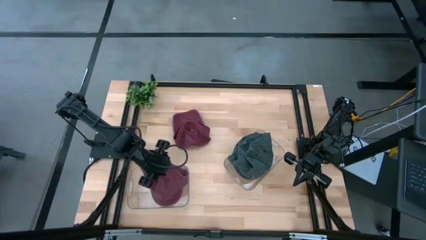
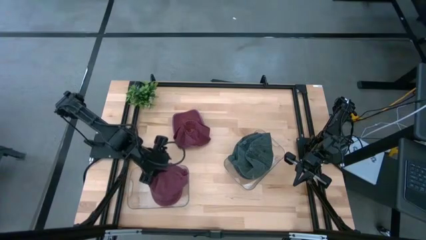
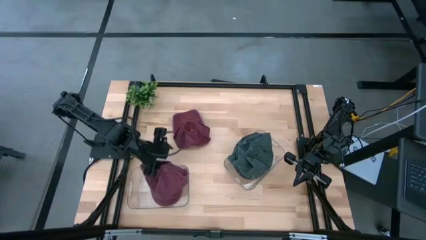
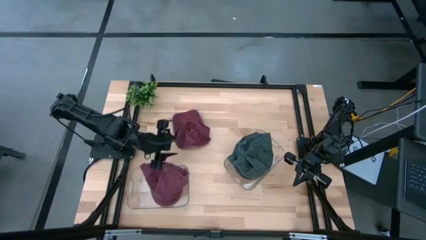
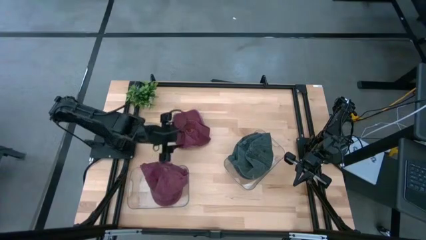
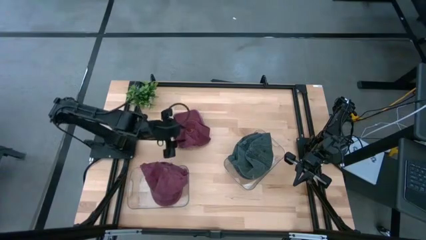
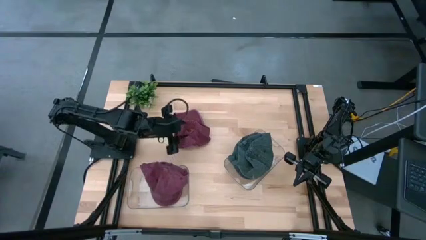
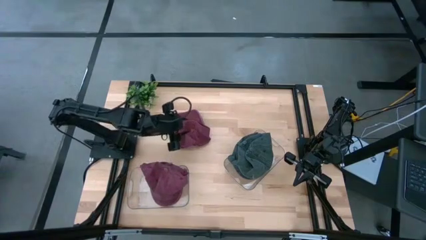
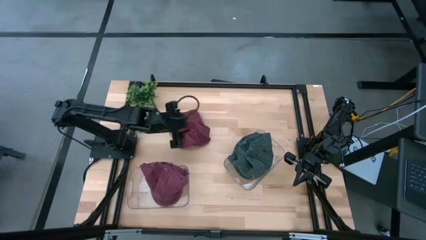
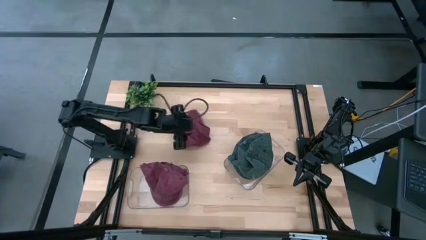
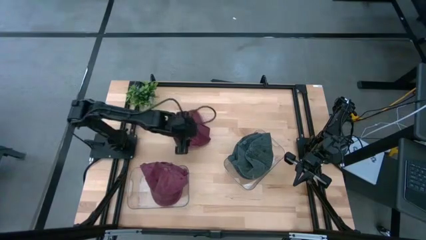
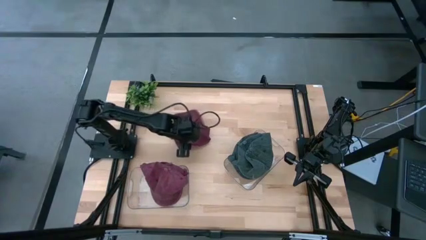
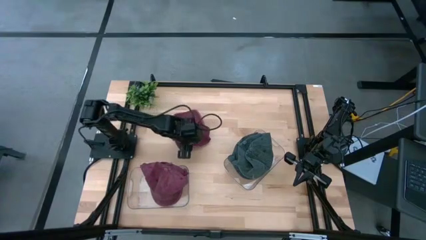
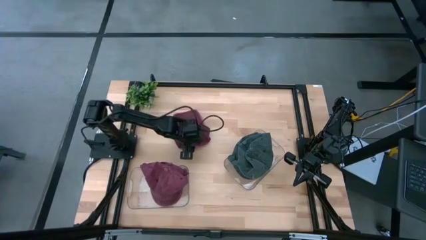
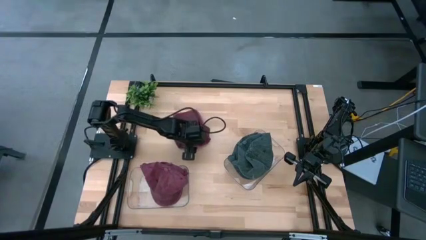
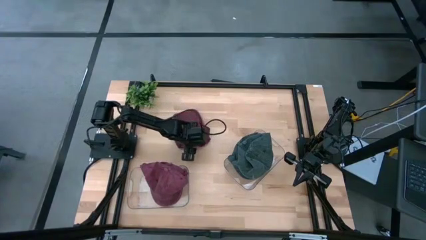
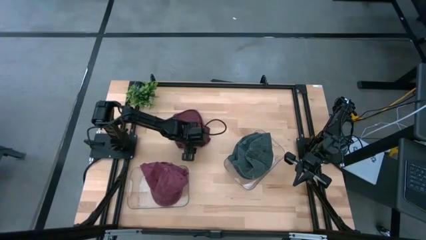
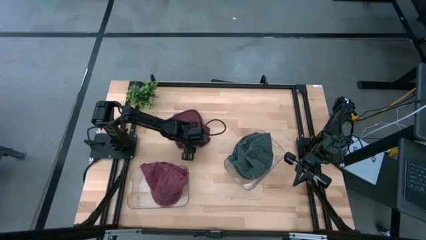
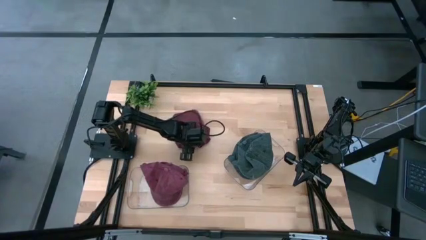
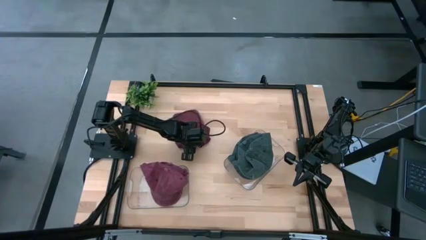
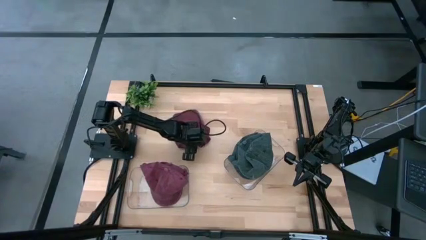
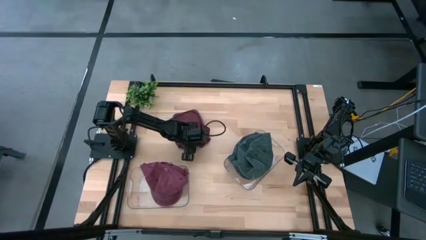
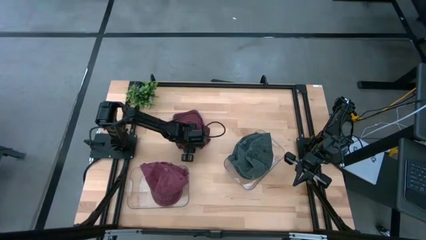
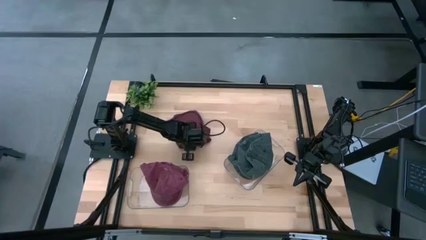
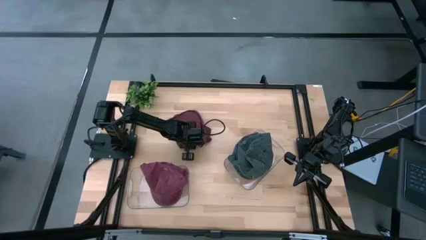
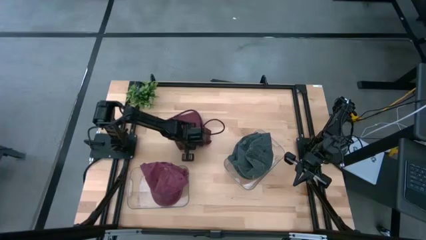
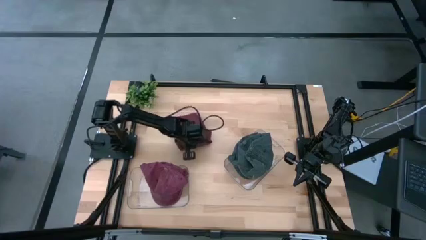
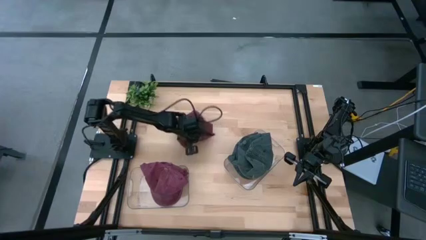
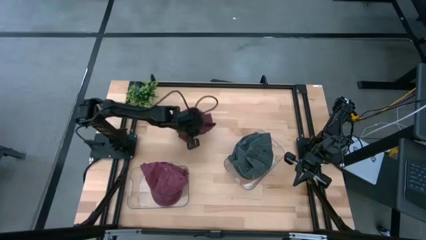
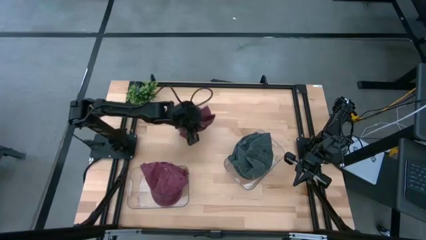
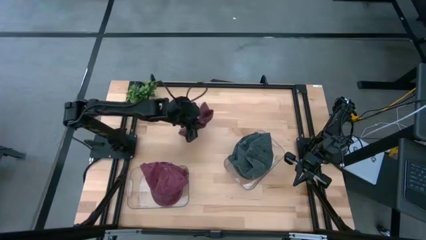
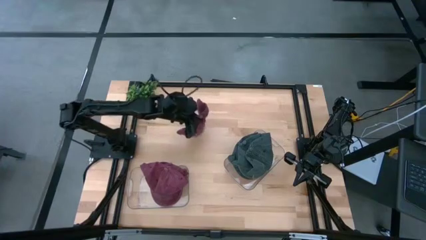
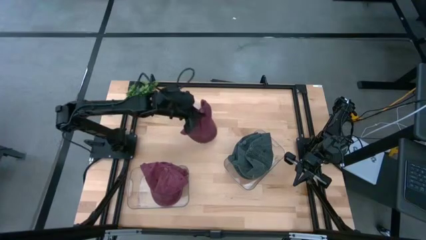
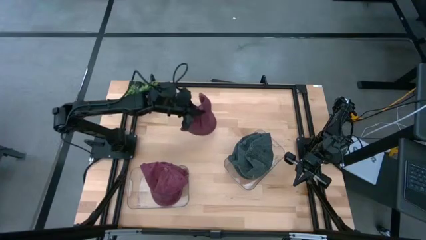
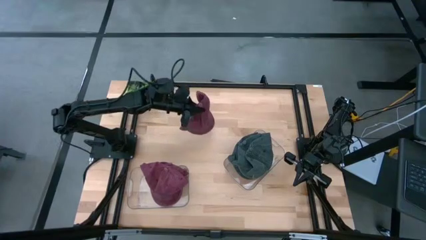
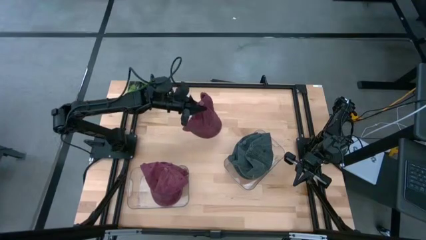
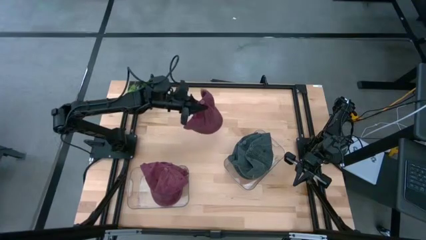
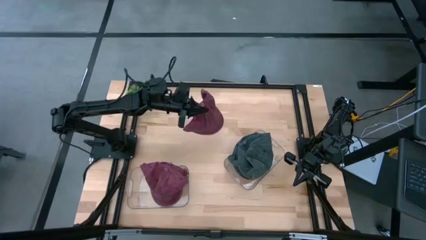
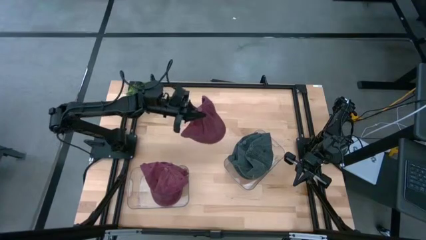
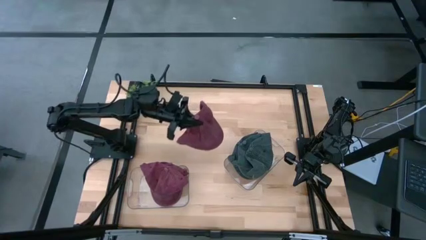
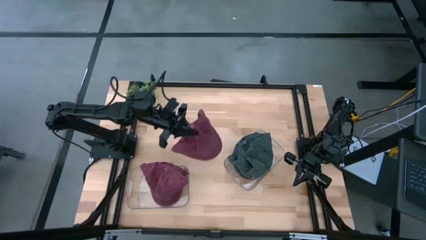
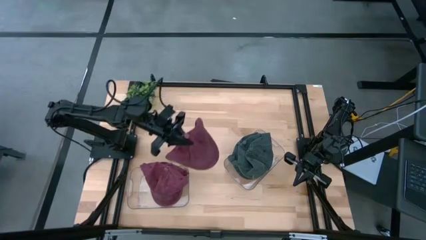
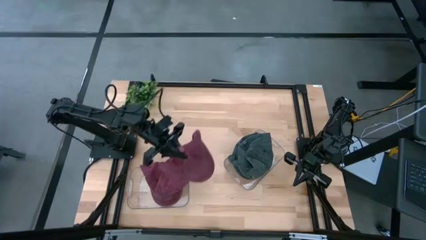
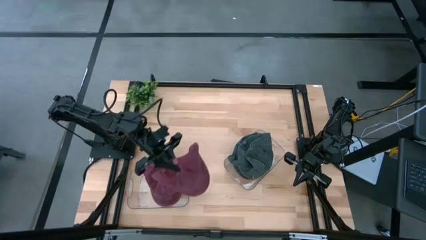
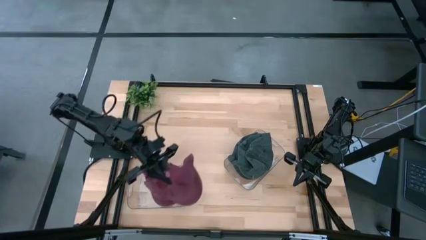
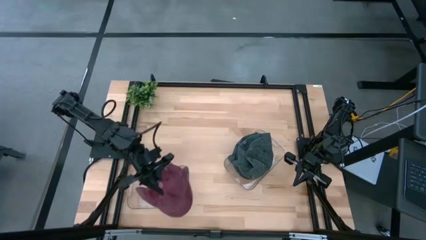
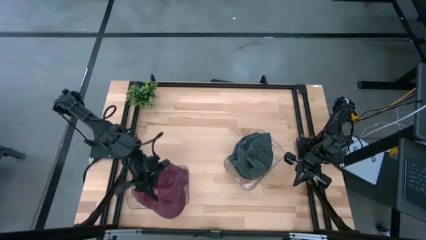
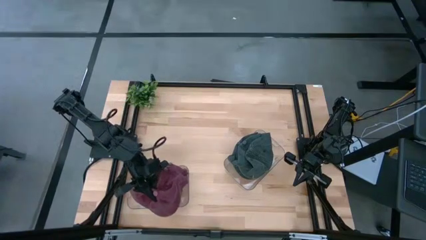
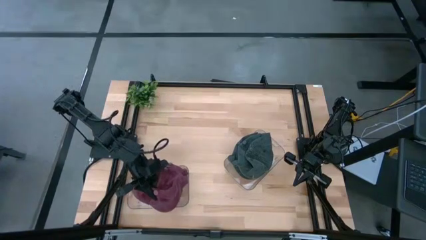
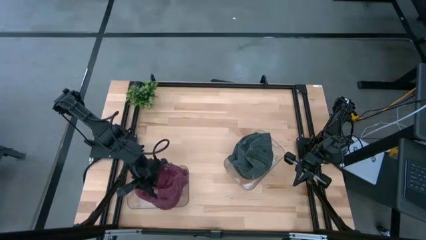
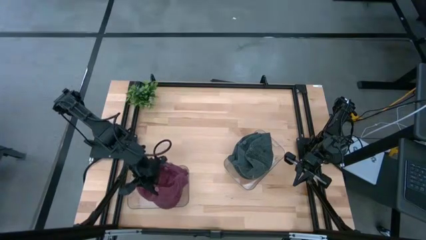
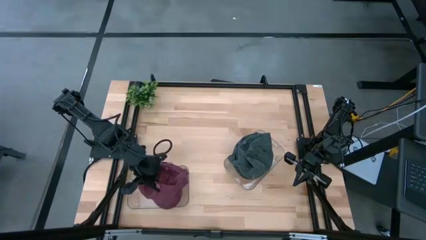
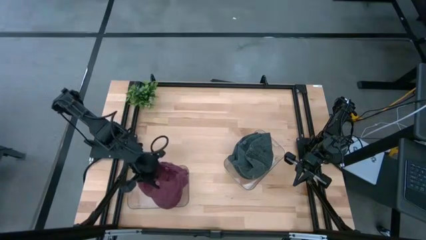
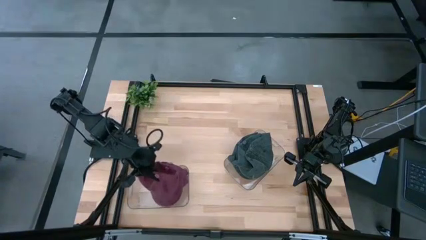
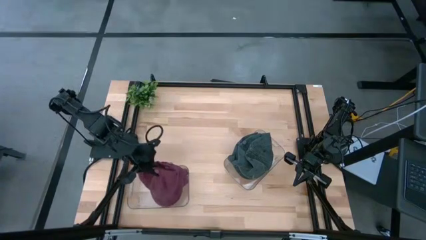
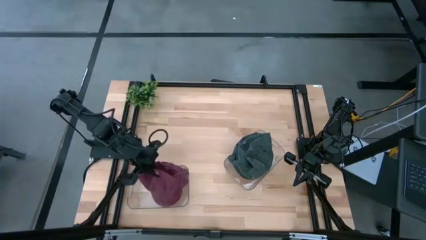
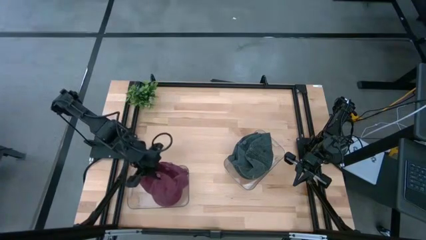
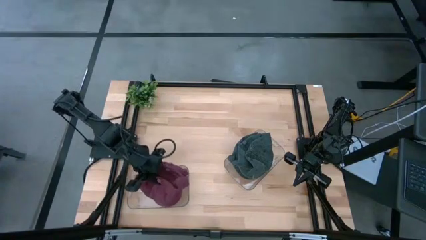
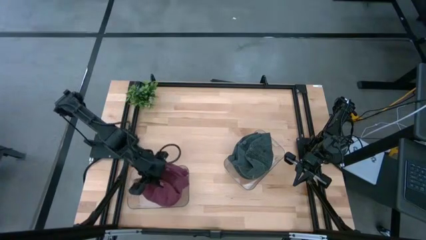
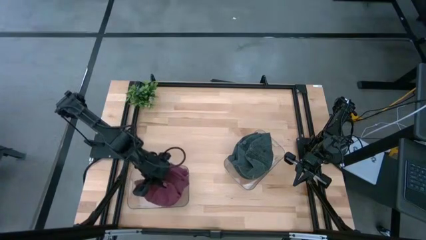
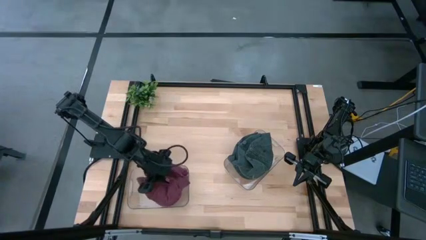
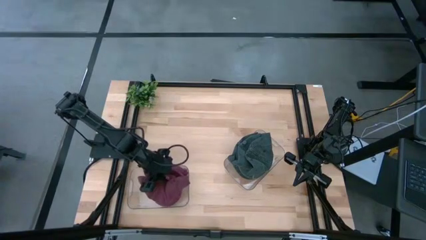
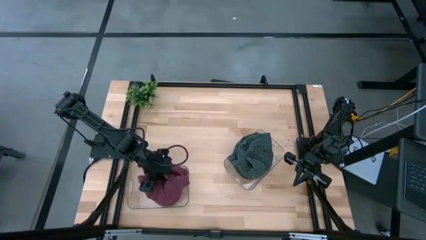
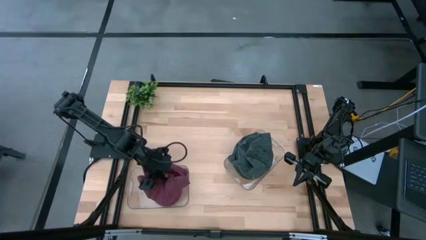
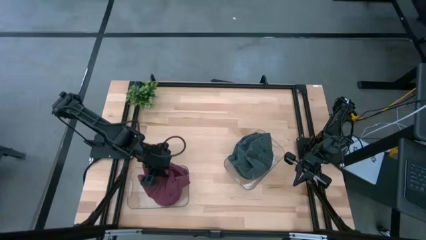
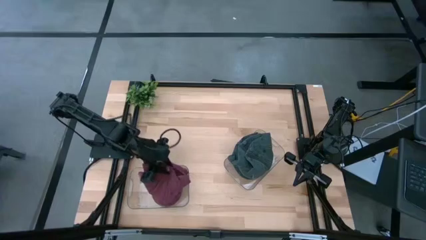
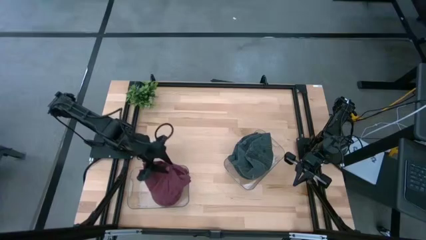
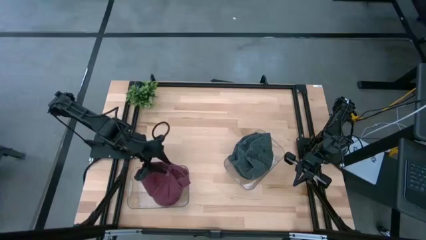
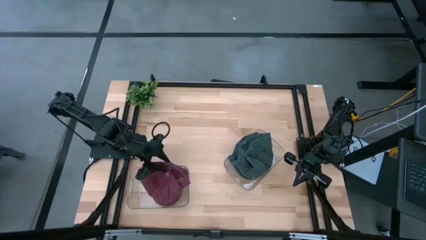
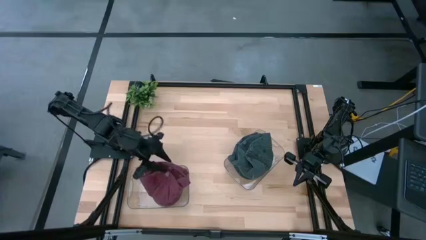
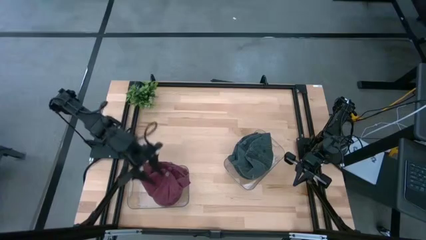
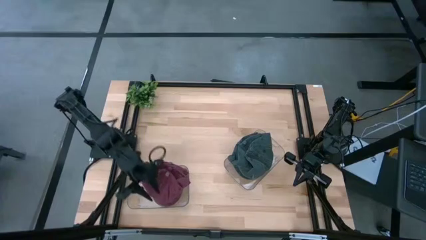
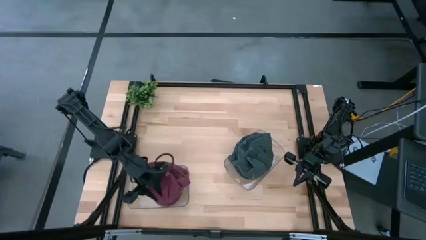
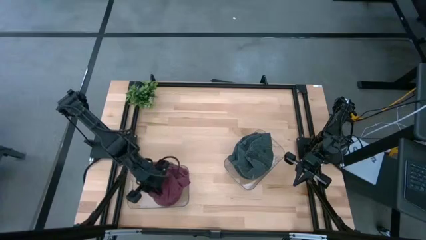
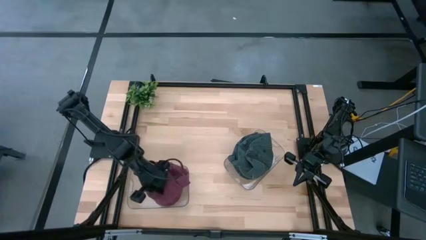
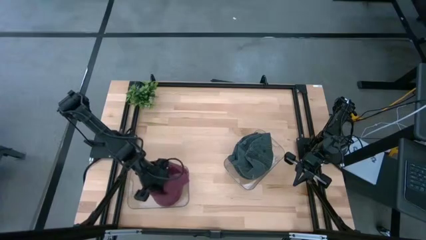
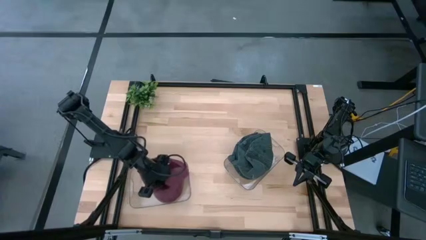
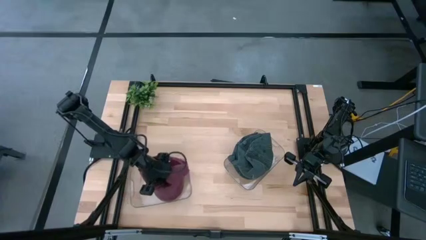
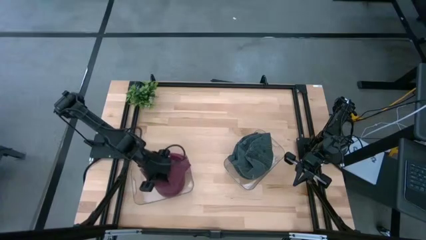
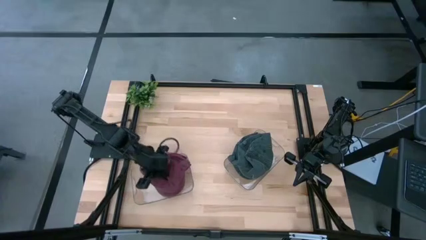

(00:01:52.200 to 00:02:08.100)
Task: Pick & Place hat
Put the red cap into the left transparent bin
